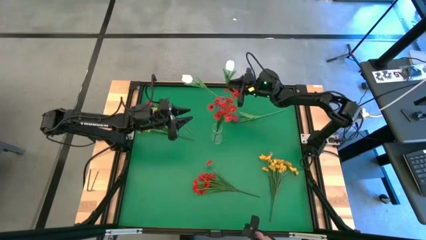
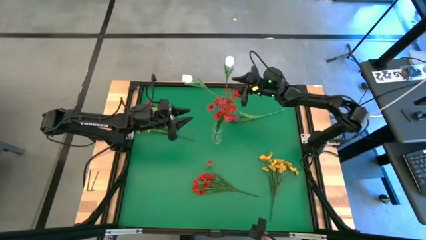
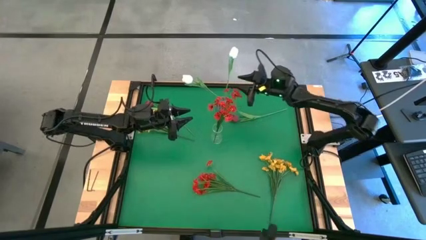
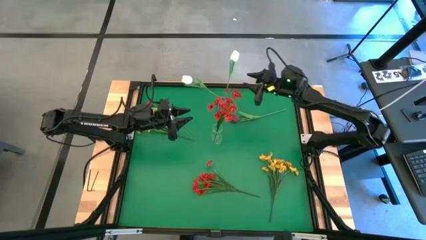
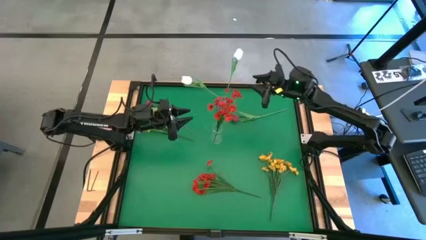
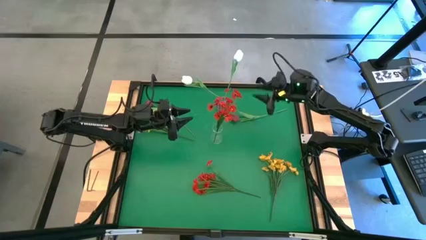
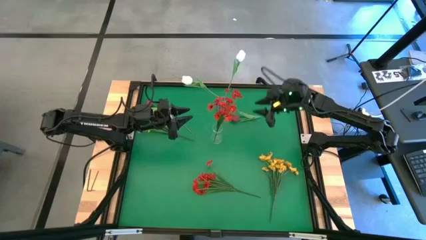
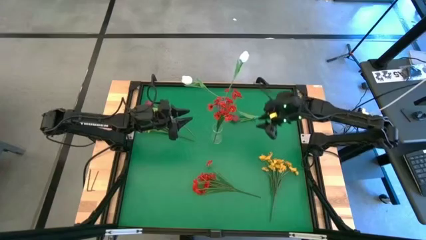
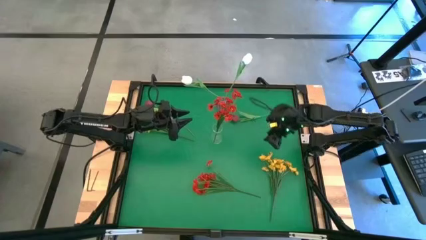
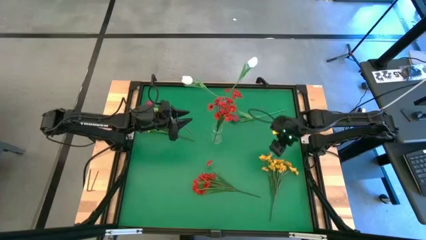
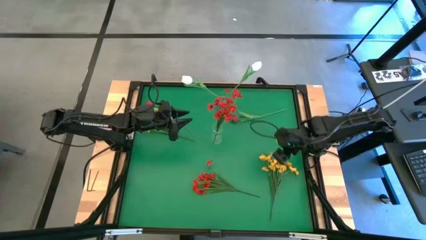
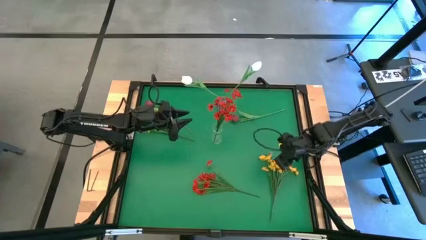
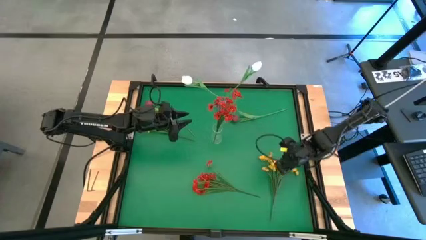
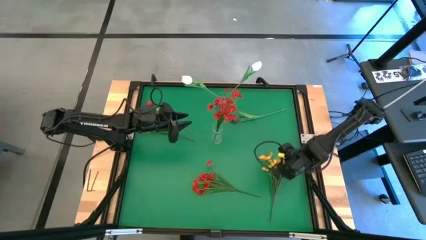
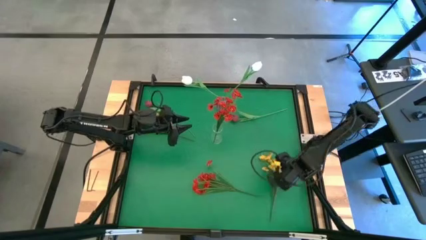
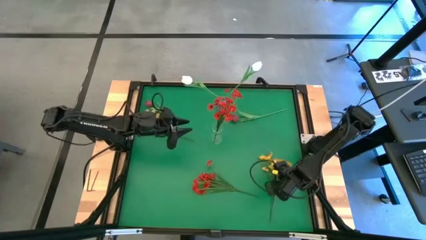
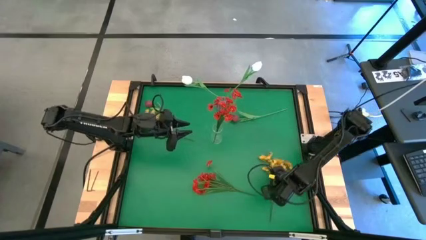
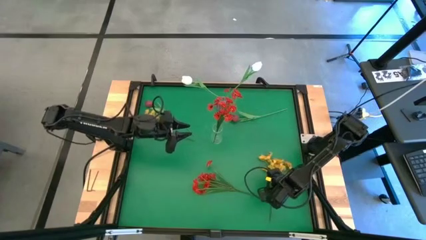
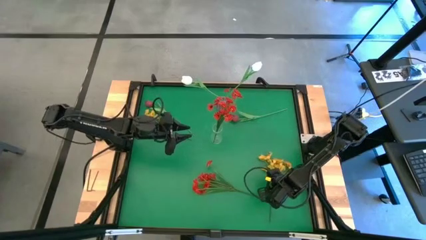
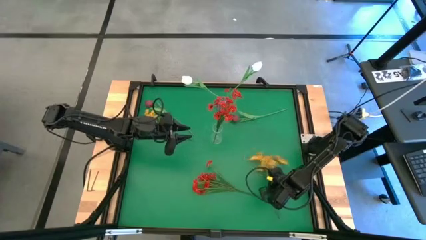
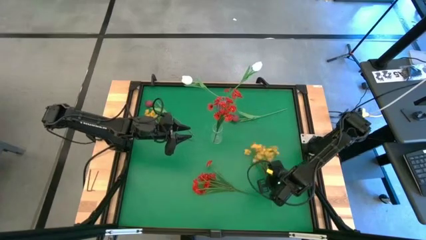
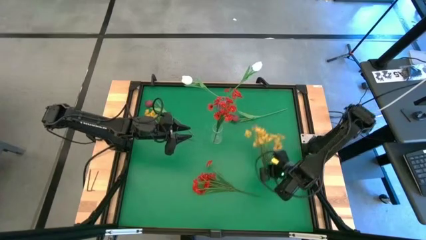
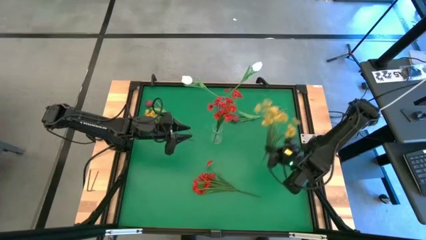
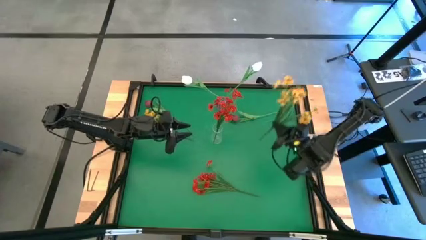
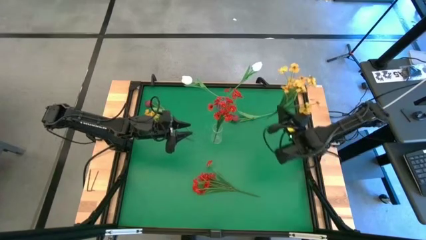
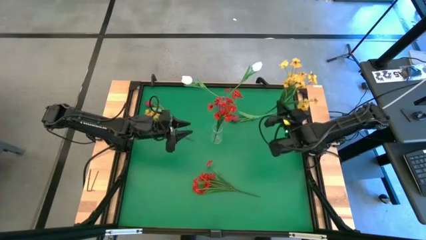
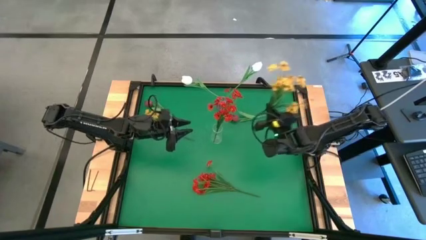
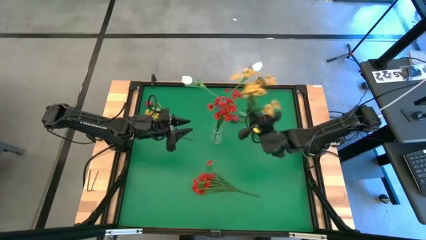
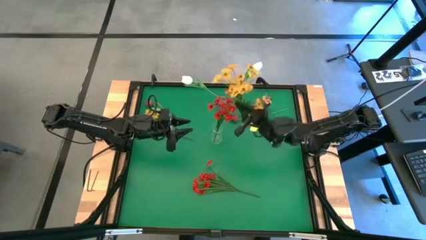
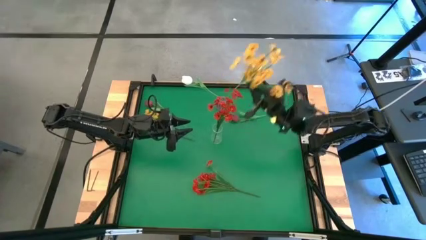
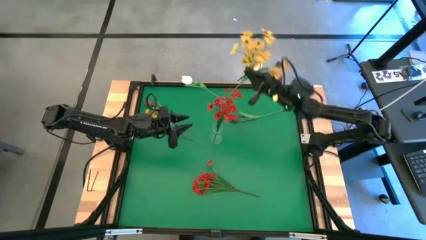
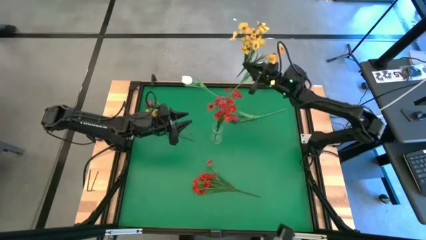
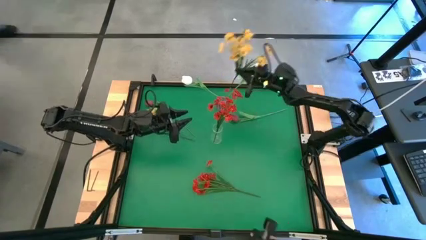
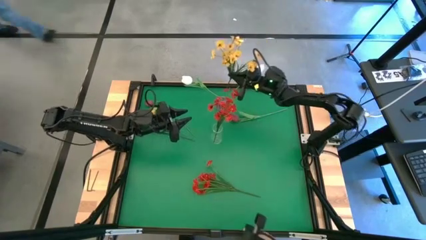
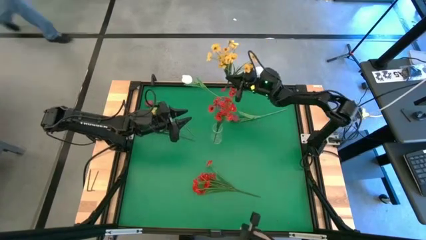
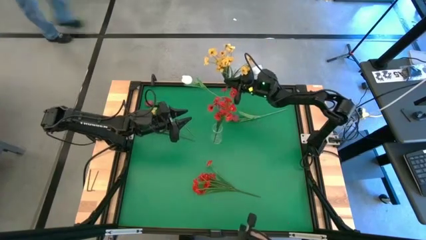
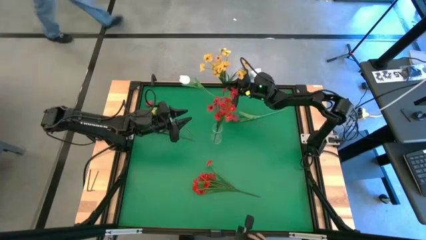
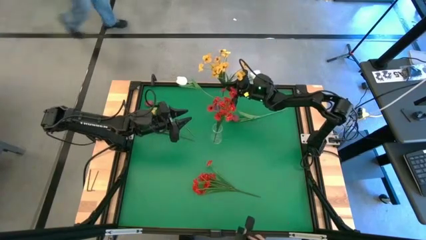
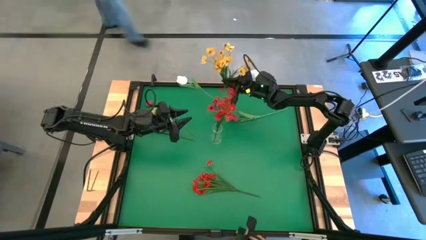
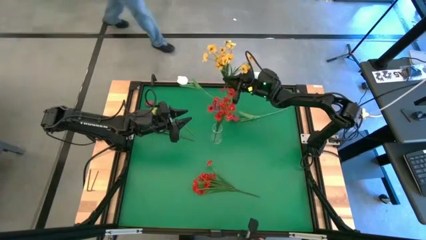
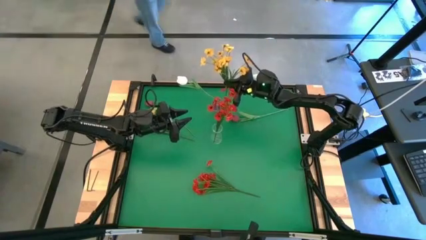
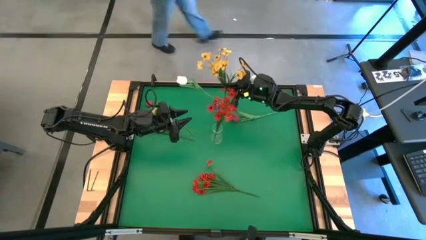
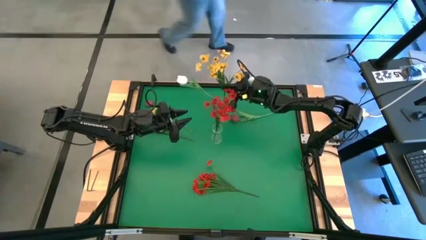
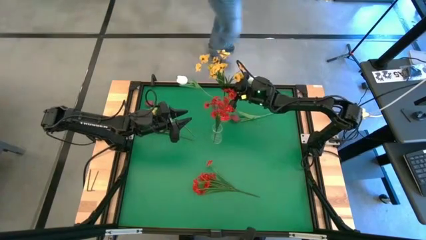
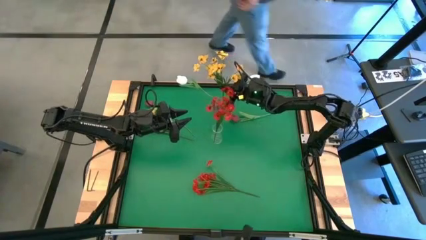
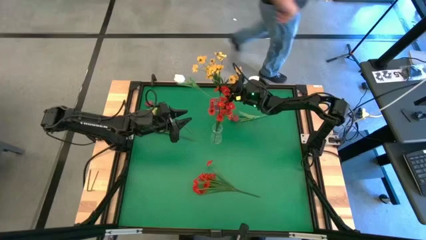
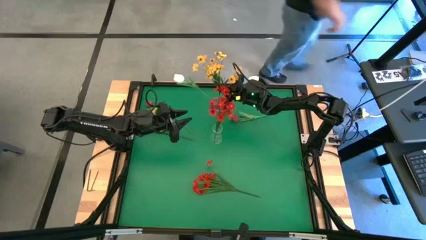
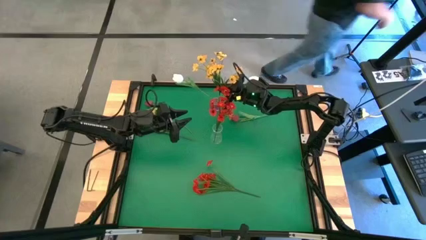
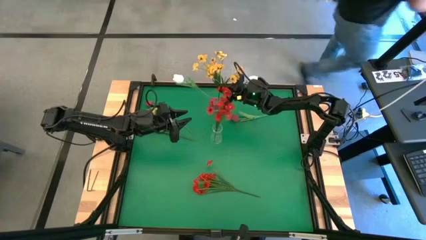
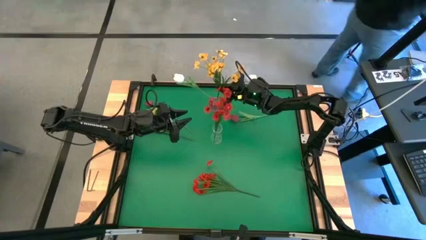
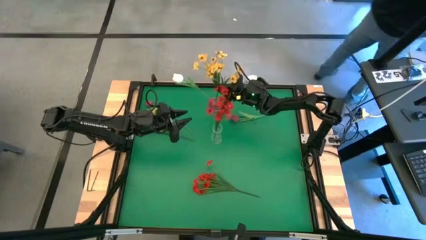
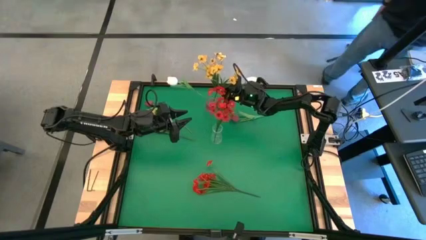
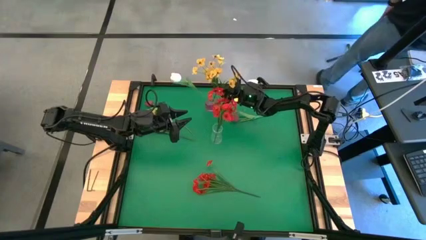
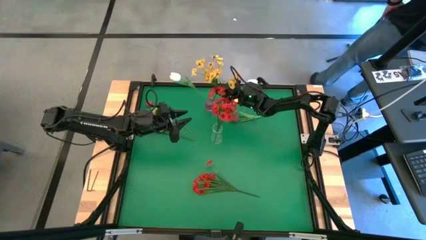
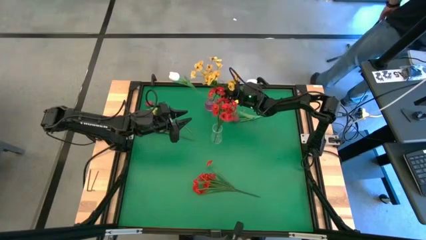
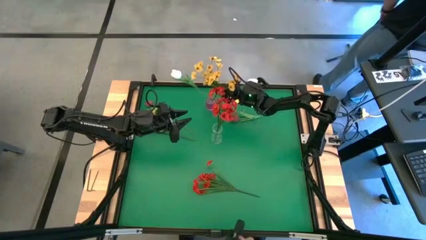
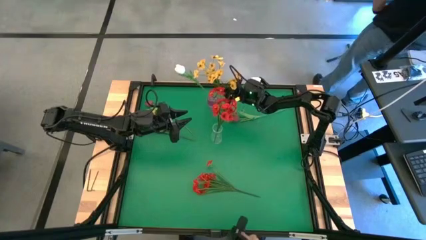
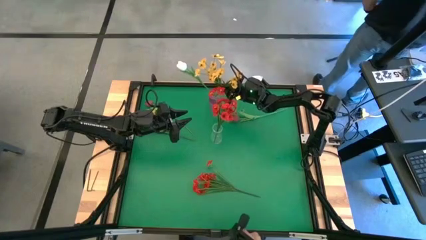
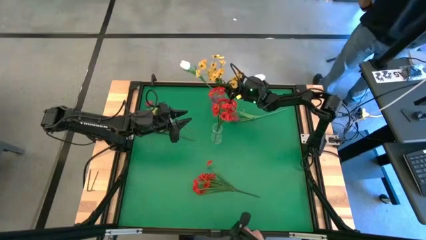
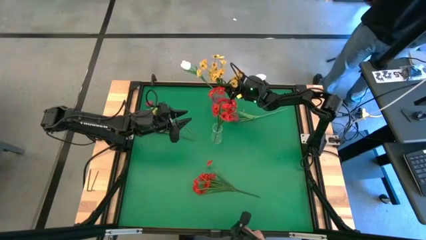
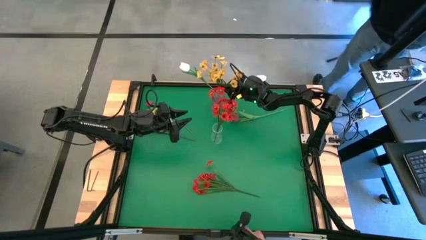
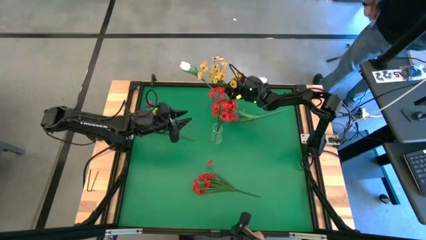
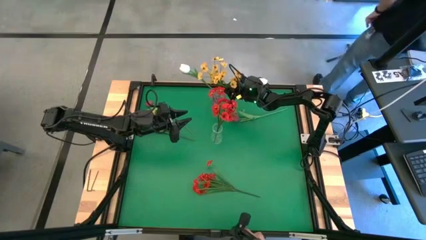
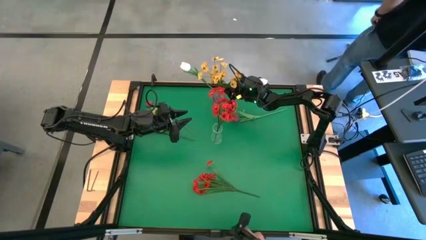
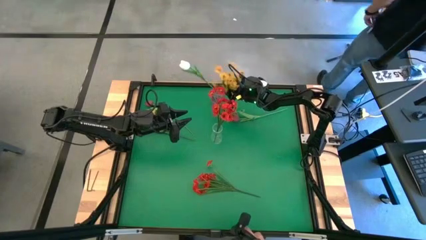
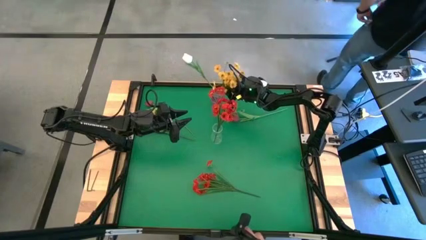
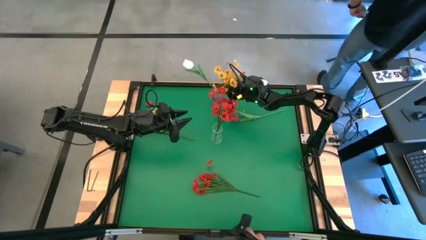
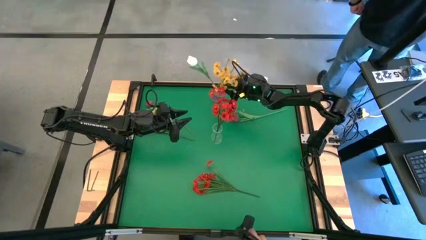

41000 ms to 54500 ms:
Task: Sort flowers into vase by color
Put the right yellow flower into the purple vase
